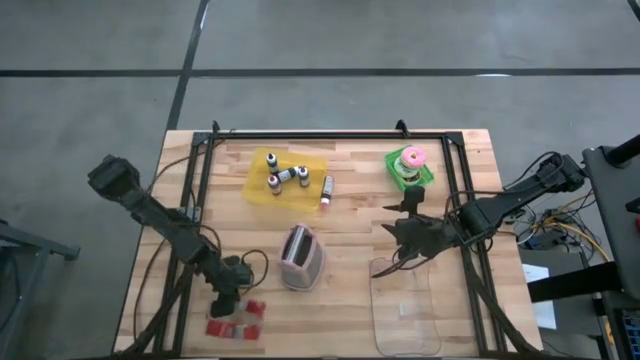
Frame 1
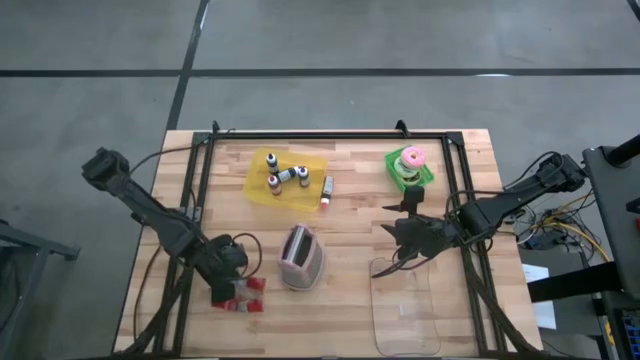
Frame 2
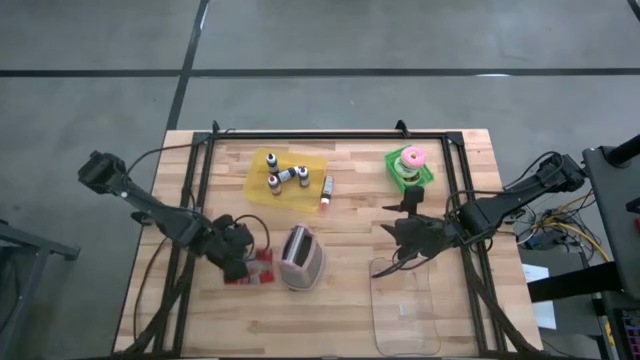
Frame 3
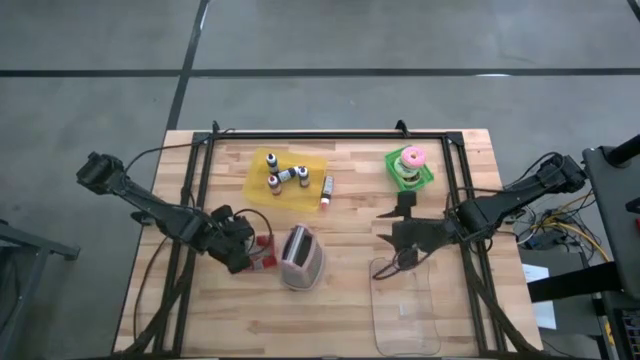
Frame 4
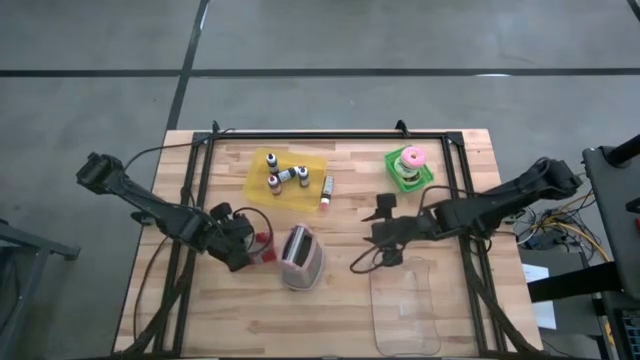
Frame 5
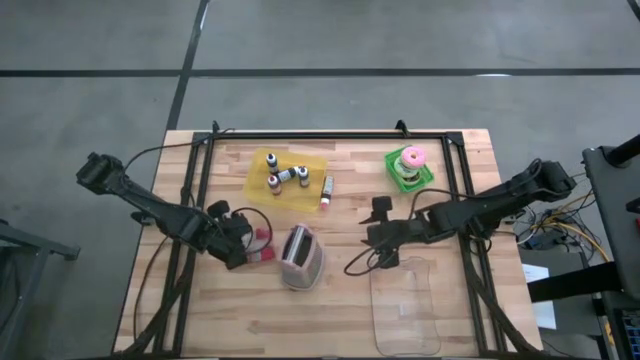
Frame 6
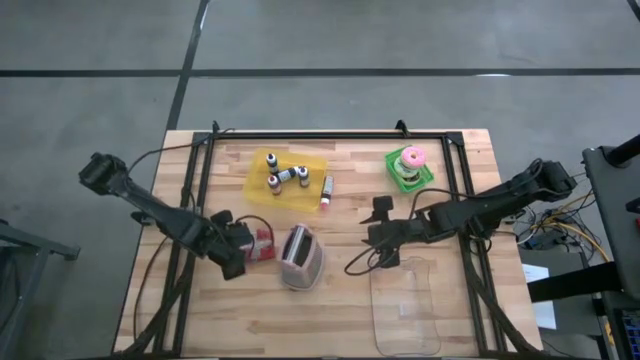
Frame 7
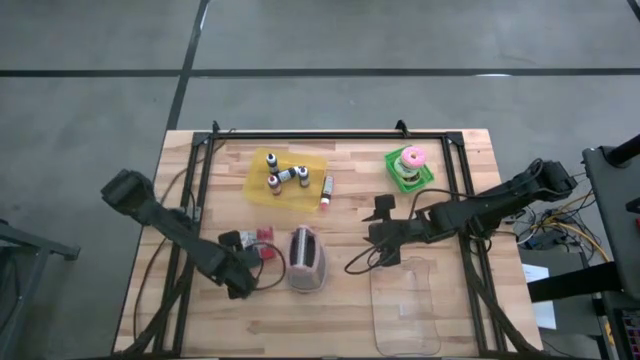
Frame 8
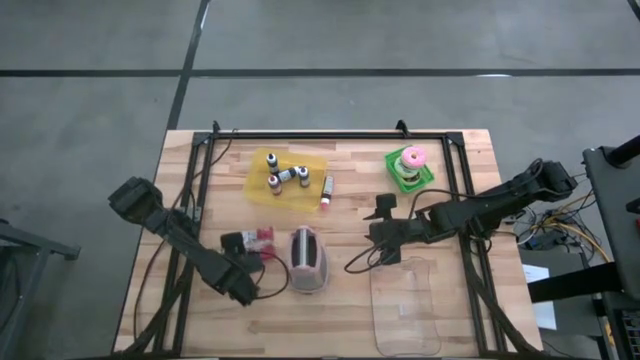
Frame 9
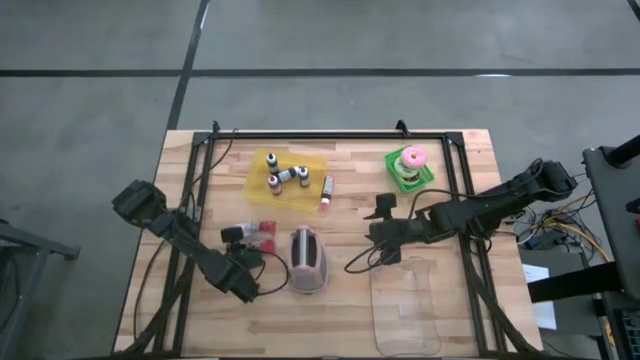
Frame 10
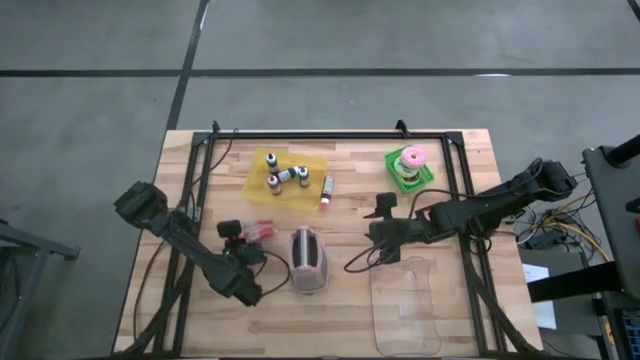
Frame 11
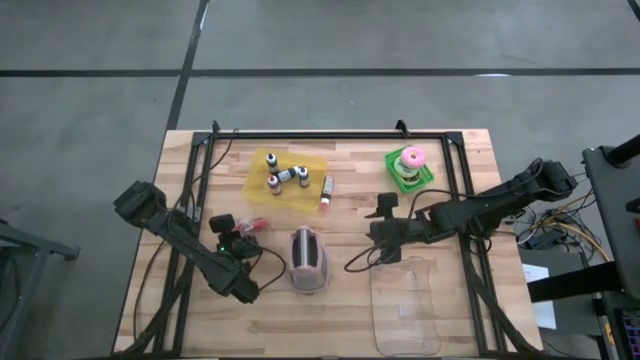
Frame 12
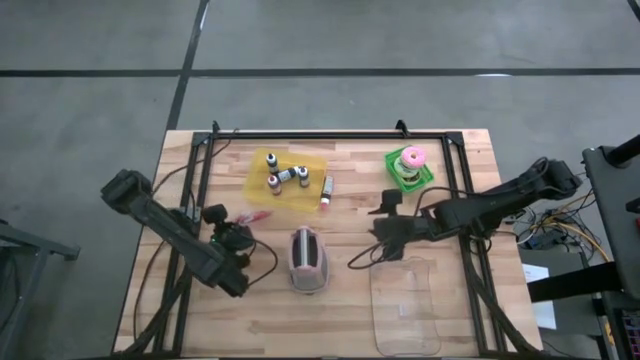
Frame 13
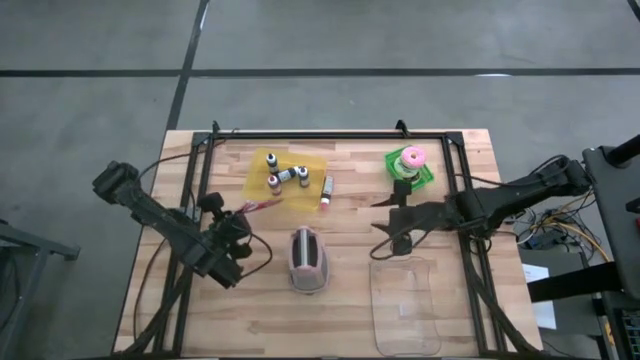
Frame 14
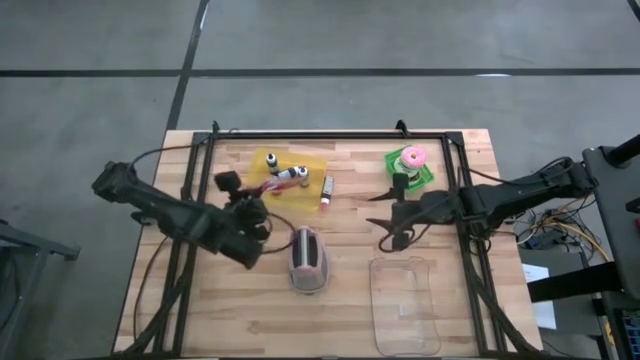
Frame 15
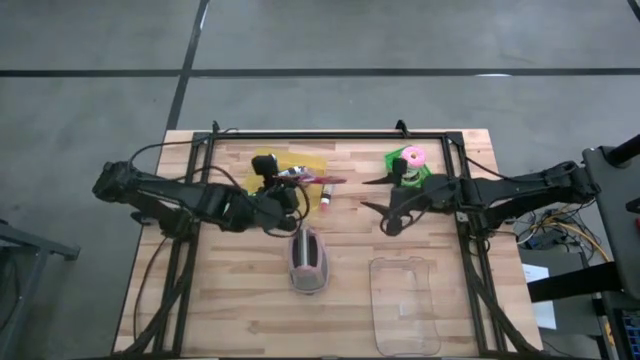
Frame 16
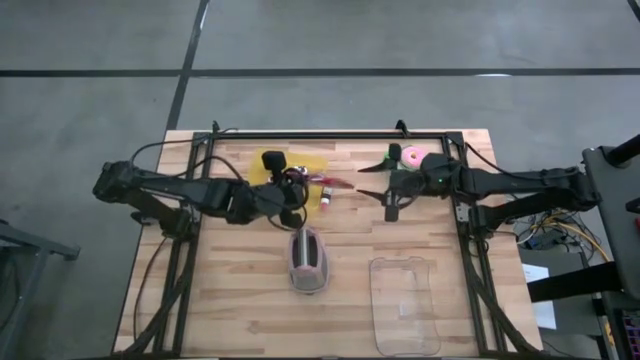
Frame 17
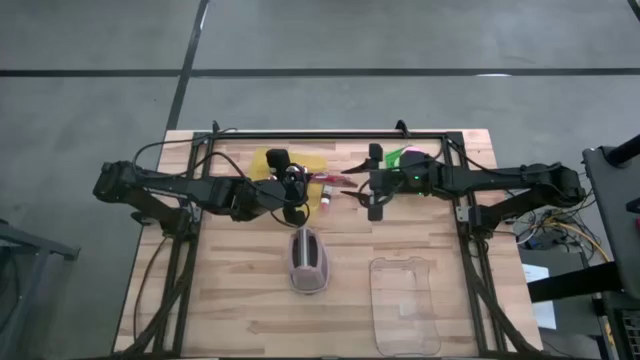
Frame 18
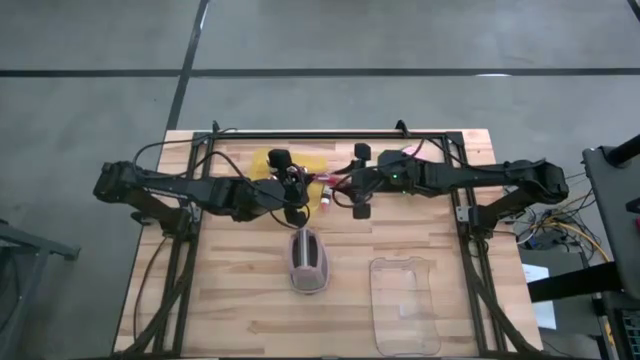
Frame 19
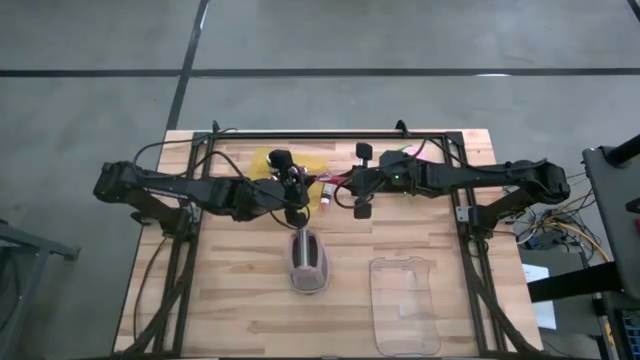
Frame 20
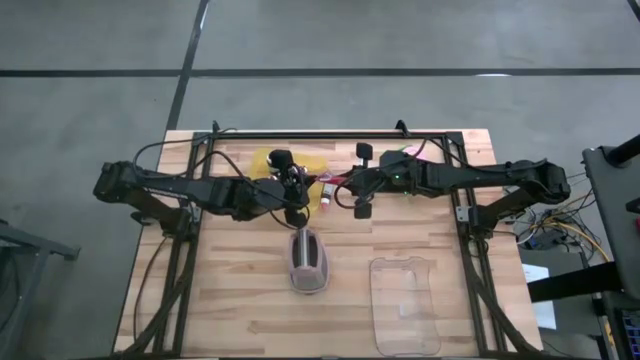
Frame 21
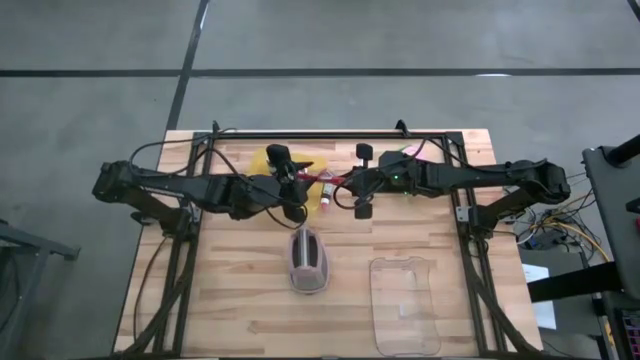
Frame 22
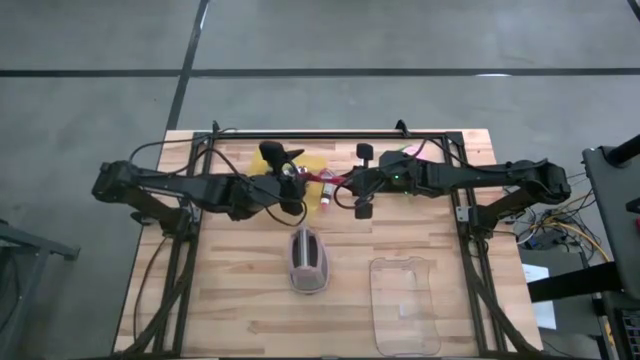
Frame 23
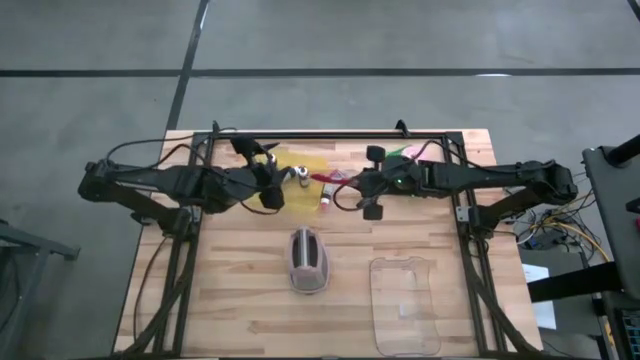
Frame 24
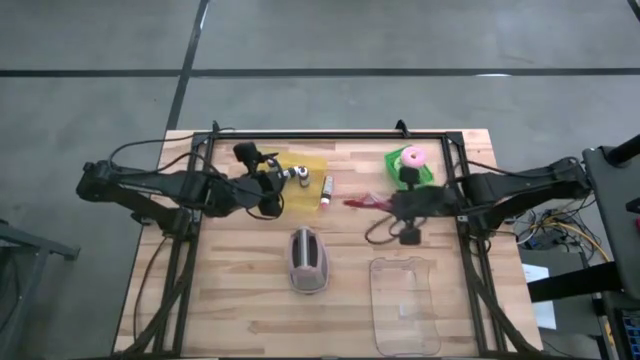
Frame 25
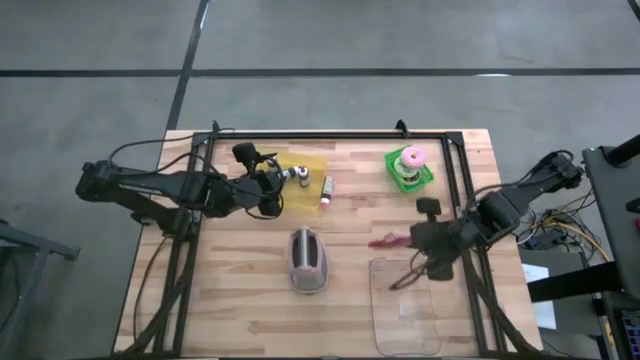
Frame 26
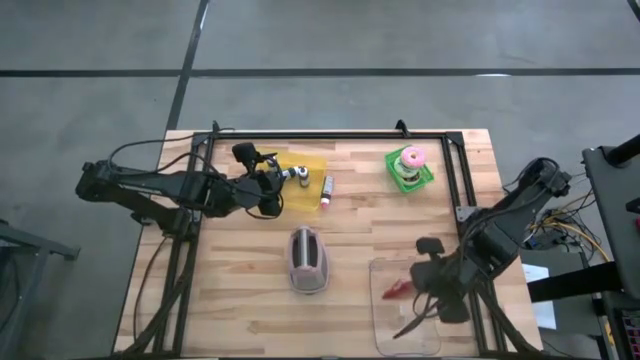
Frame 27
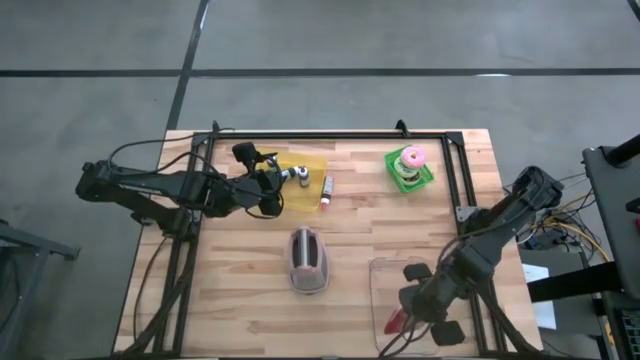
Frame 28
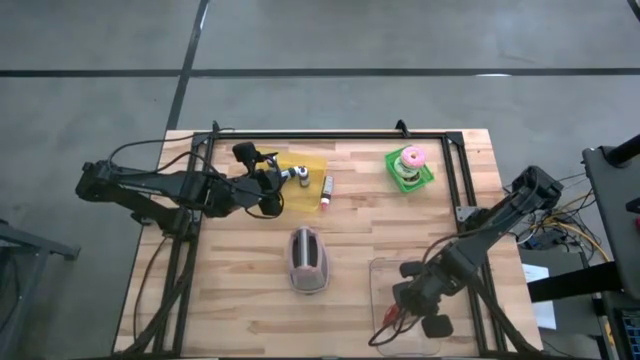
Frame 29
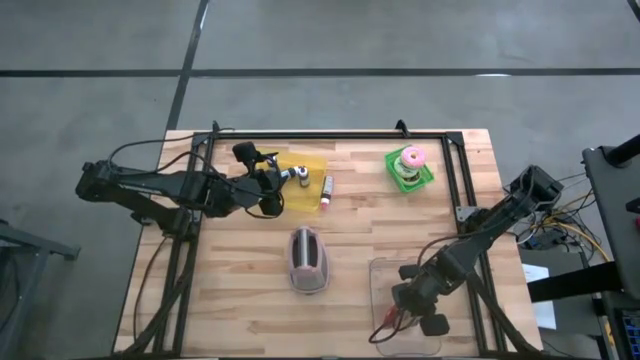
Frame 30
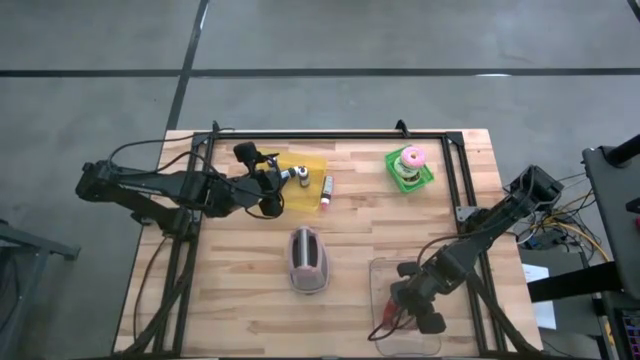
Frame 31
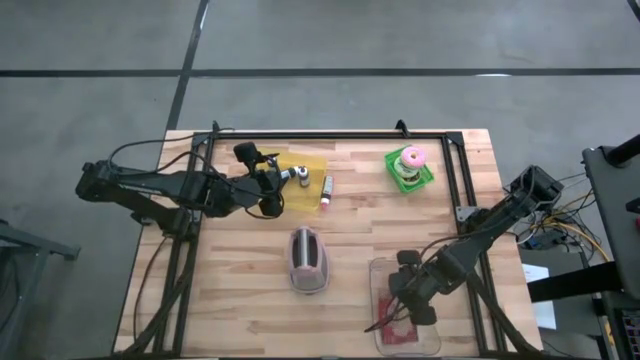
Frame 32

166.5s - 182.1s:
Task: Pick & Place Food Item
Put the popcorn bag into the transparent bin

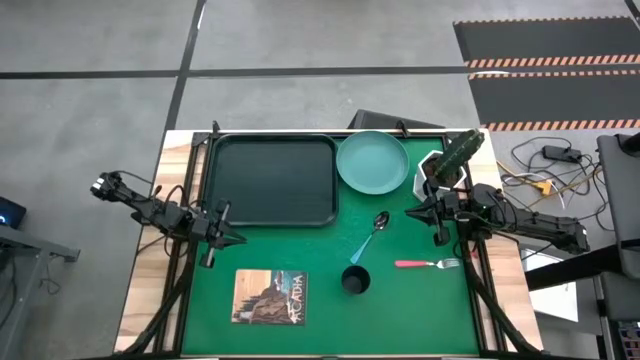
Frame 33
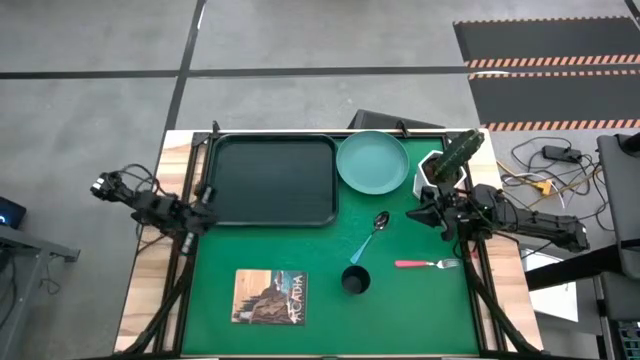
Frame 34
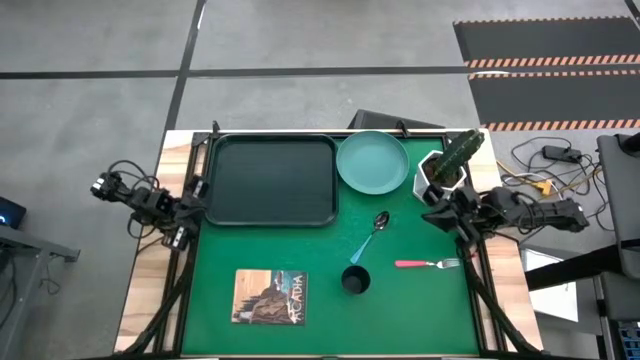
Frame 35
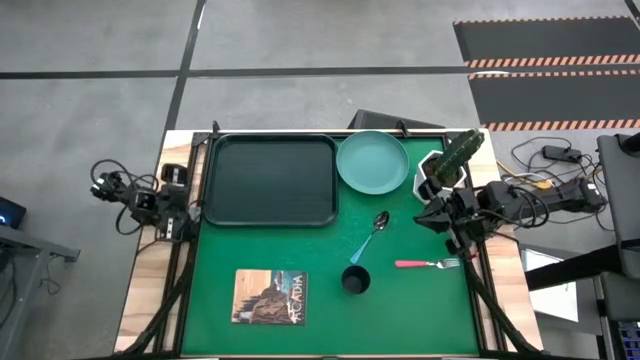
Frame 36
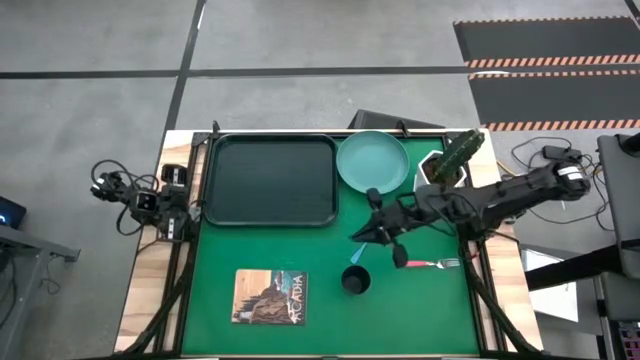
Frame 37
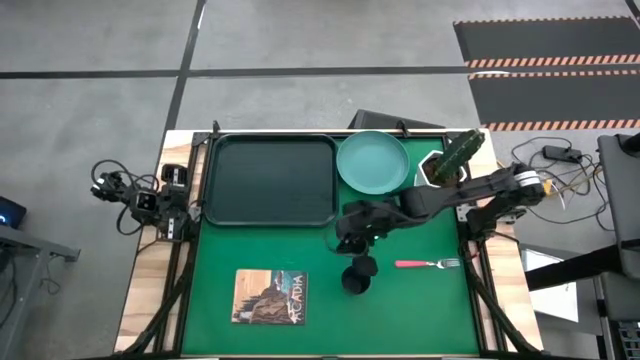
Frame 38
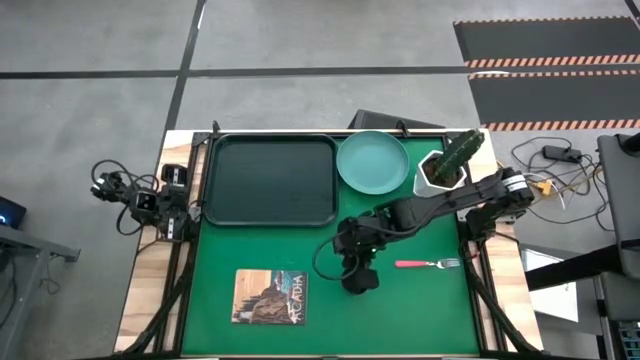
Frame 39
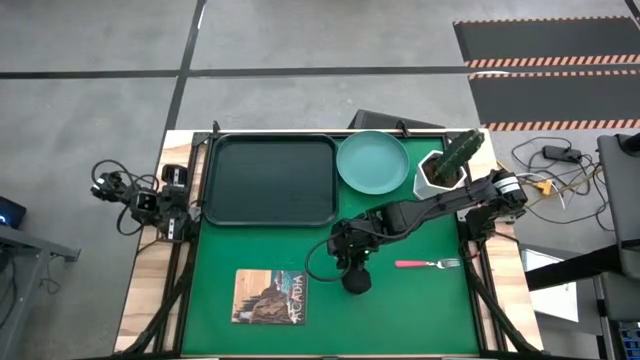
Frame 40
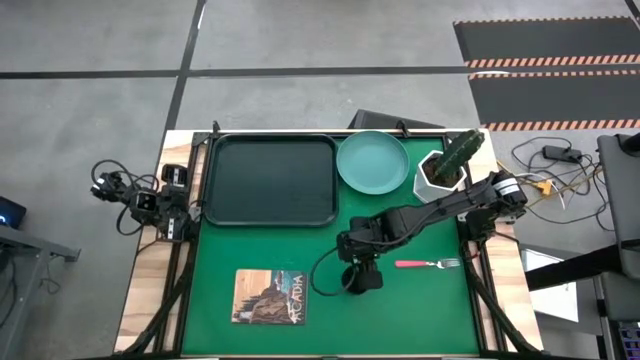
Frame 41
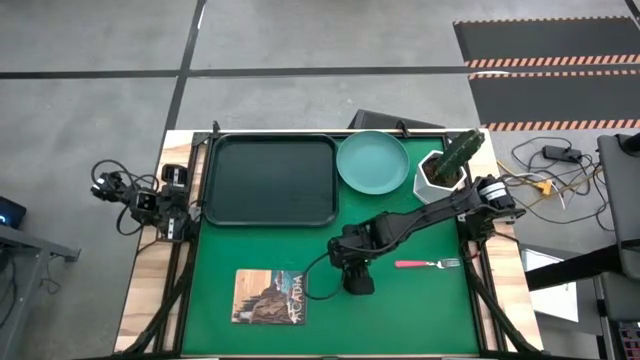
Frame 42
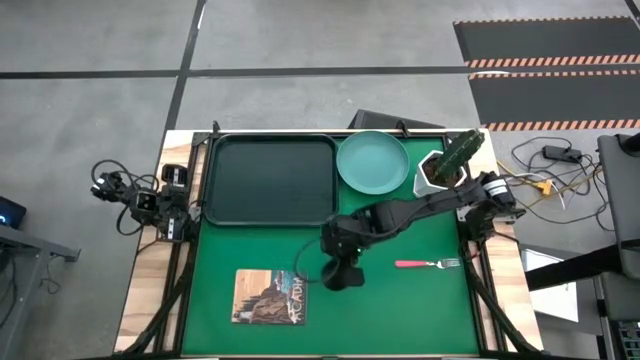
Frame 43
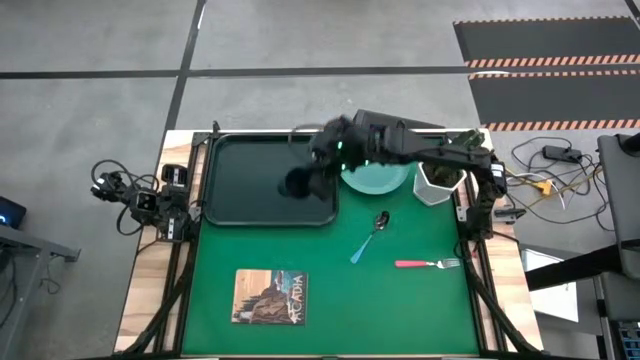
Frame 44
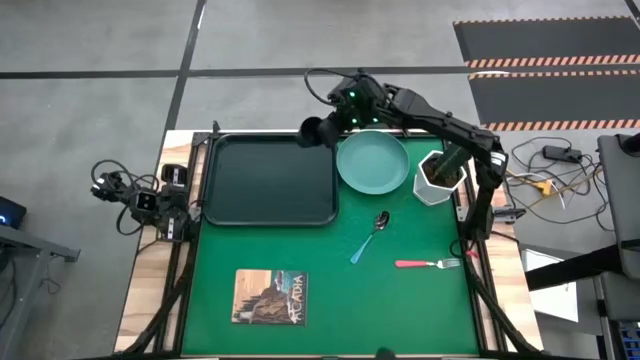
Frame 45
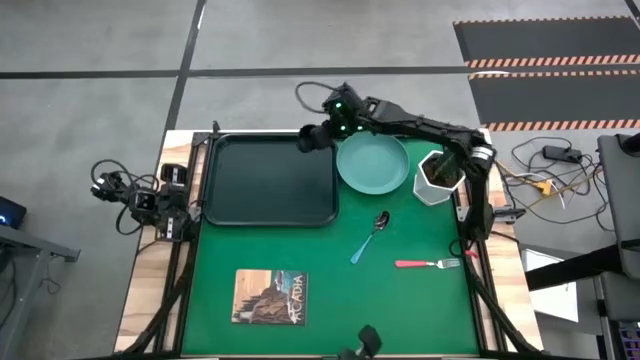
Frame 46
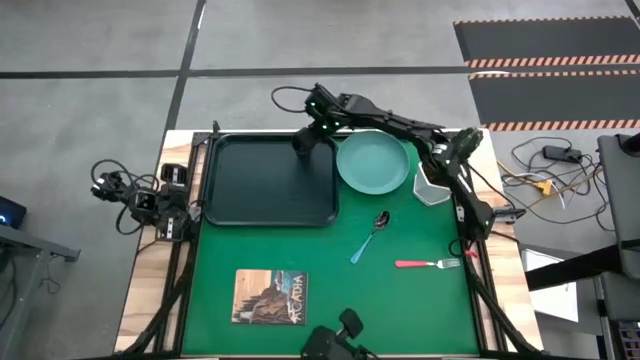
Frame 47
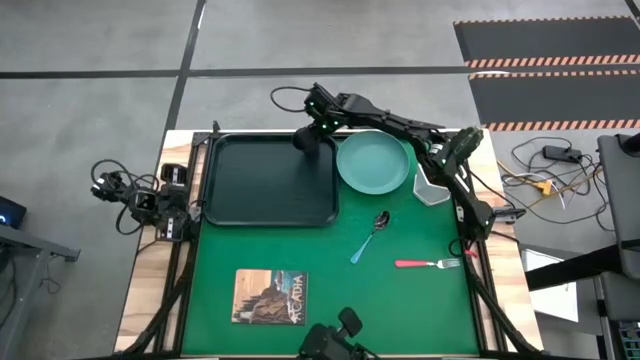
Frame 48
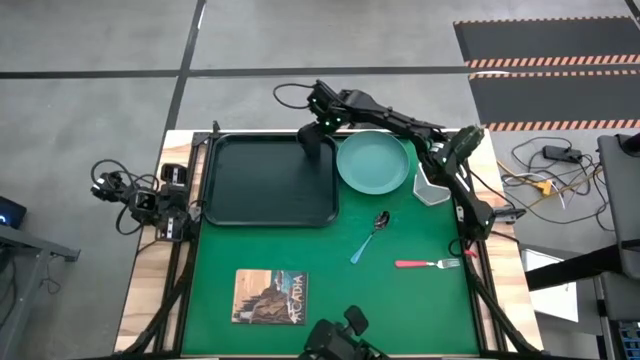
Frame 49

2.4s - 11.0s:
Task: Pick and place plate/cup/fork/spoon on tray
Put the black cup on the top right of the black tray
